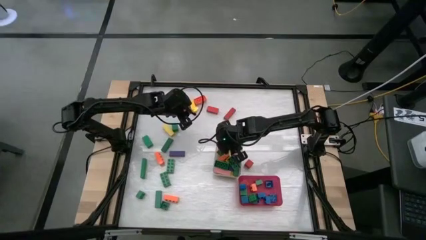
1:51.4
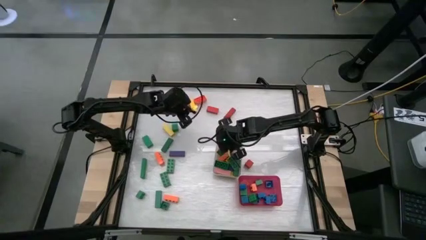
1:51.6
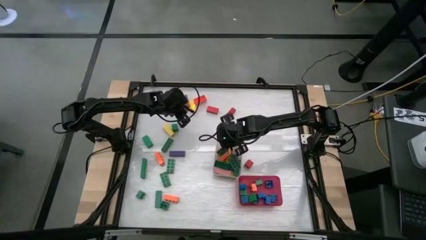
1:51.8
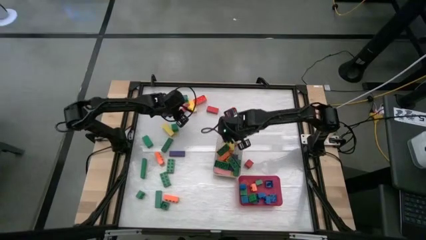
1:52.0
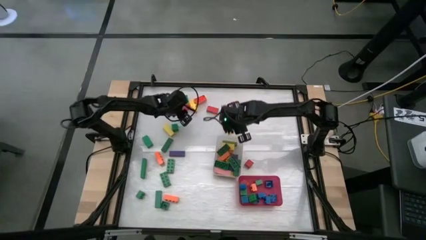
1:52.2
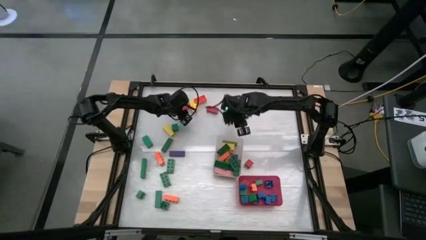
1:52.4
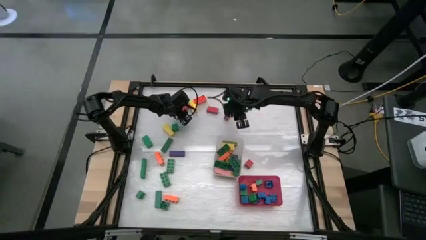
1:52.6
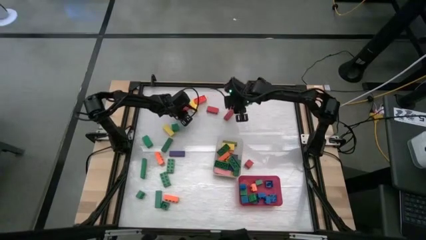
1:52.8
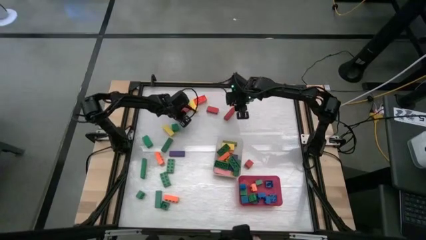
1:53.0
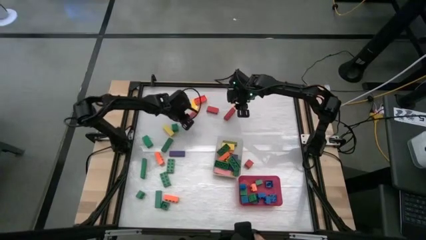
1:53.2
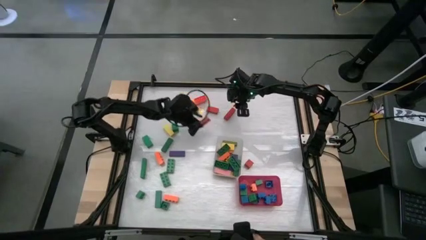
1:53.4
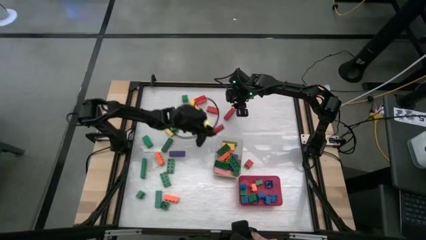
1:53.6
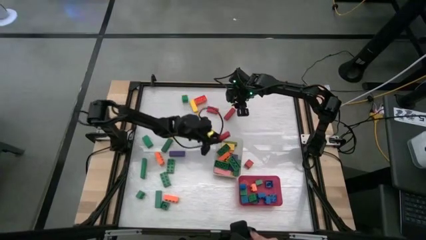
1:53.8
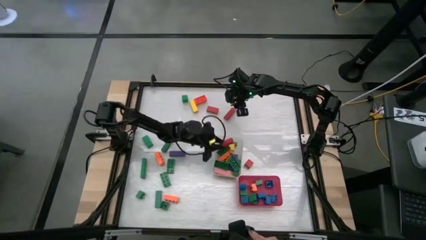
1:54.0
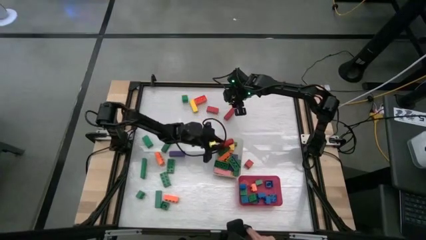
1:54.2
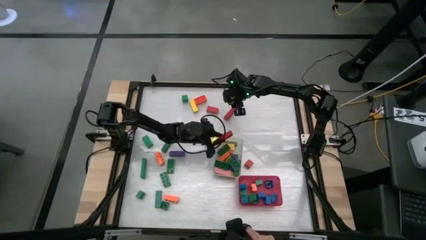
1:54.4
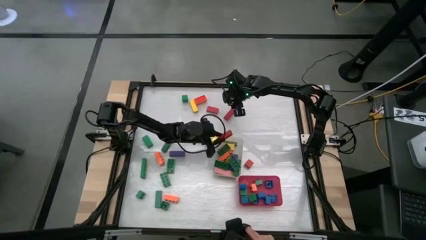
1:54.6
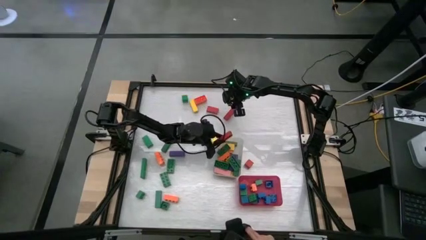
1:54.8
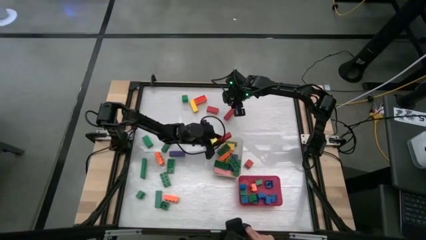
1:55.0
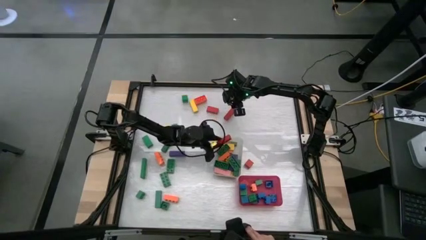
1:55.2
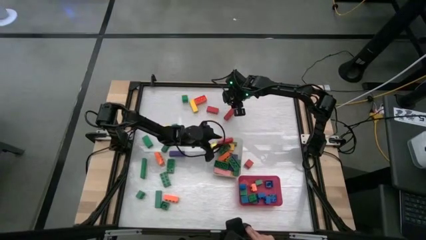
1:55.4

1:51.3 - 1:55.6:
Task: Sort blocks by size
Put the orange rectangular block into the transparent bin

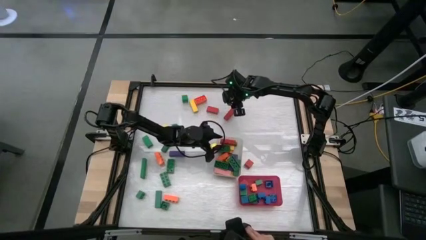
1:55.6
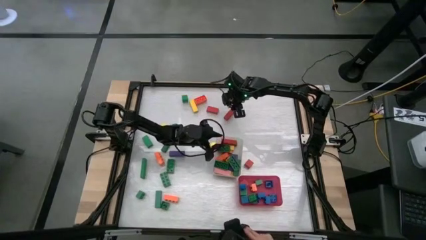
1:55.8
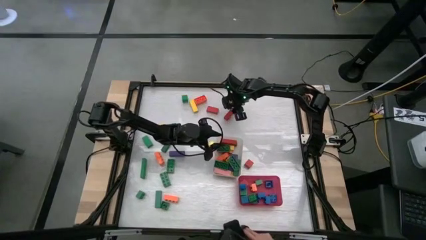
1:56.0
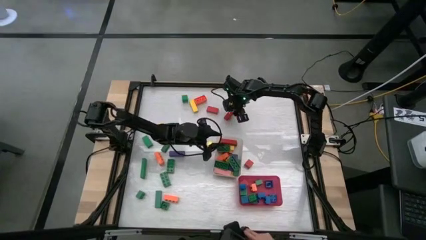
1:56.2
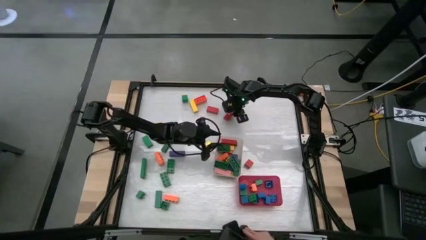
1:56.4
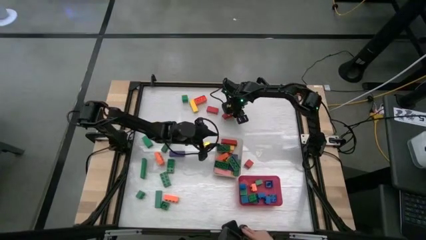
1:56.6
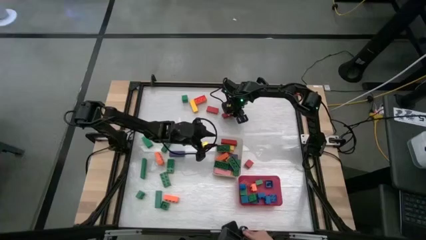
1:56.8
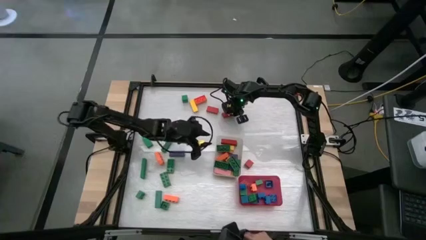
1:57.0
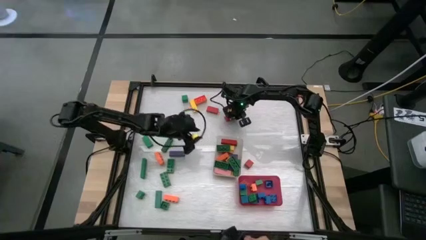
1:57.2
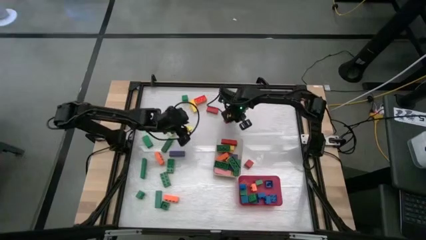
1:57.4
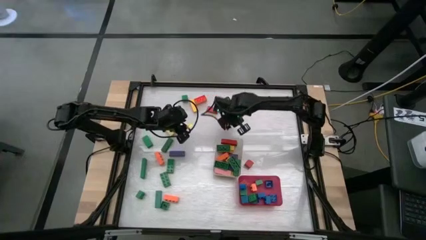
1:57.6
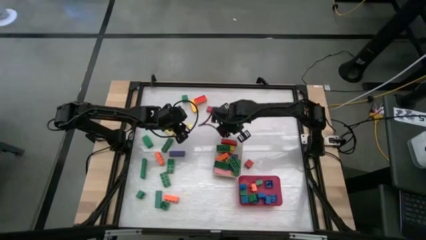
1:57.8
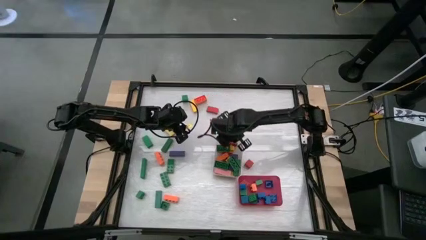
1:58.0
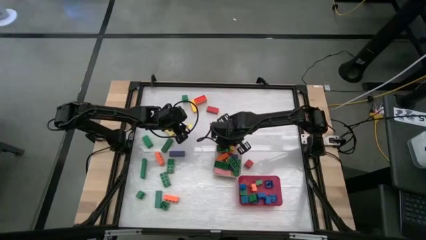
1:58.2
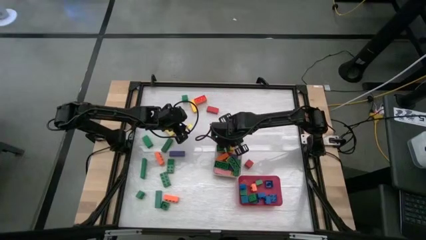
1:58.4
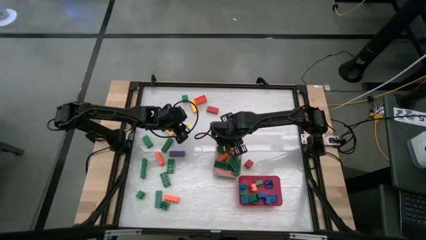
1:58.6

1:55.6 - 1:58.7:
Put the red rectangular block into the transparent bin

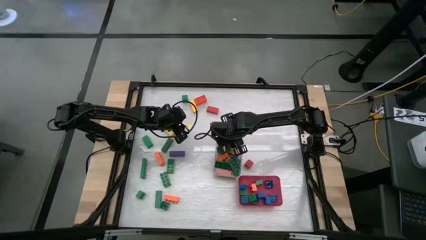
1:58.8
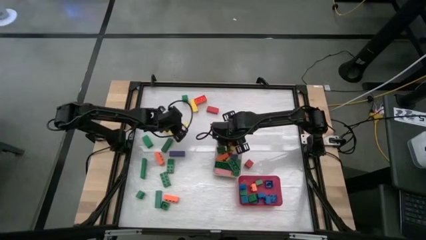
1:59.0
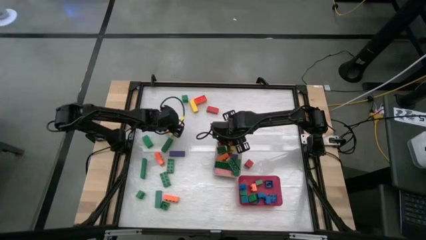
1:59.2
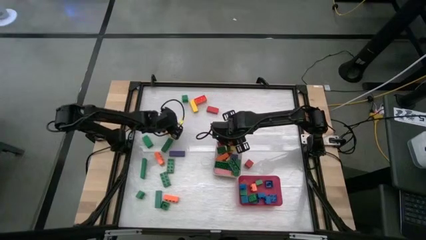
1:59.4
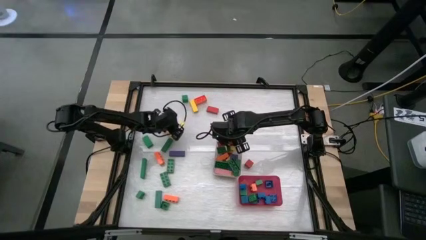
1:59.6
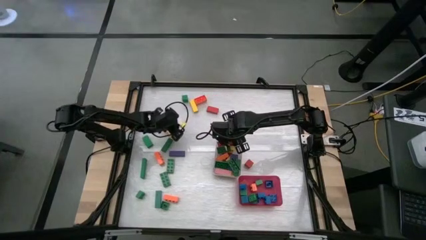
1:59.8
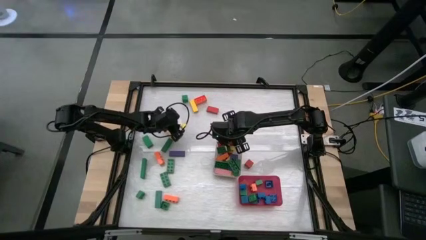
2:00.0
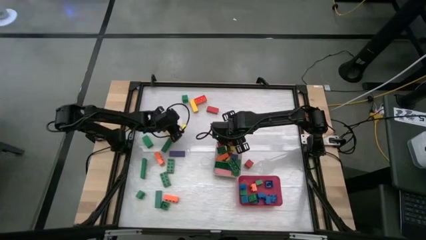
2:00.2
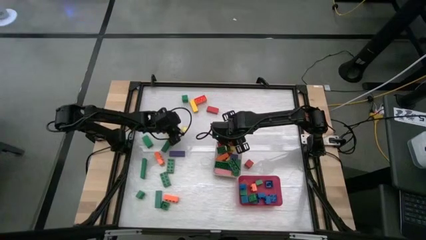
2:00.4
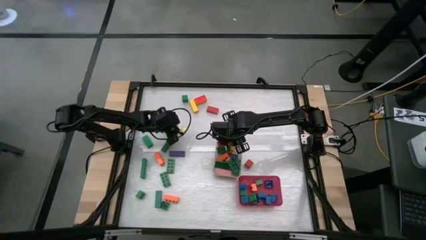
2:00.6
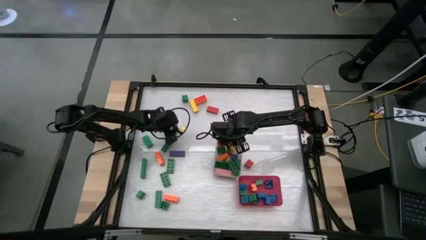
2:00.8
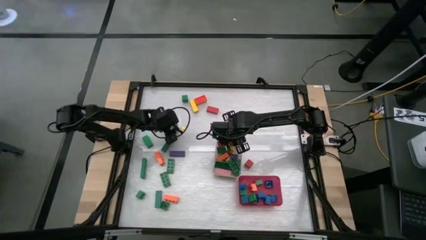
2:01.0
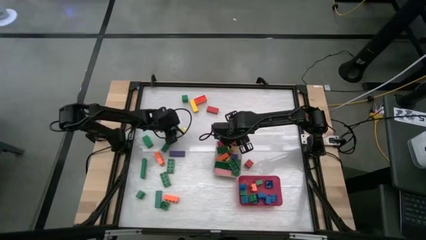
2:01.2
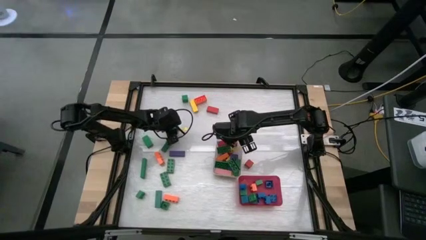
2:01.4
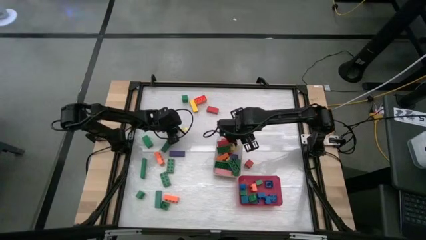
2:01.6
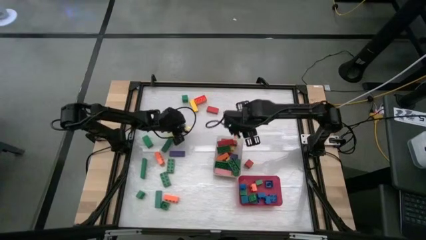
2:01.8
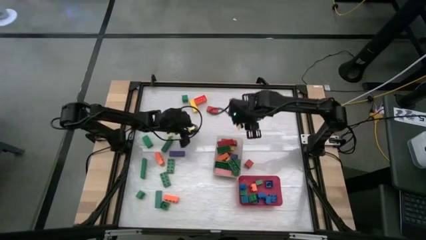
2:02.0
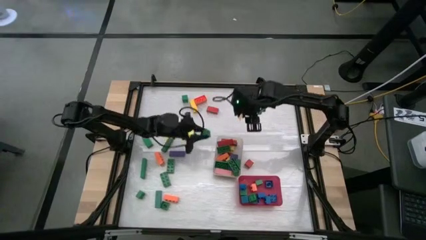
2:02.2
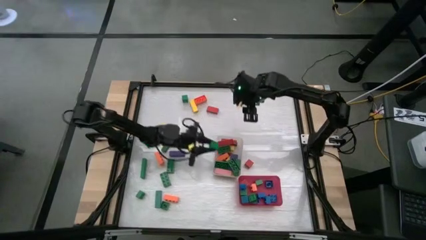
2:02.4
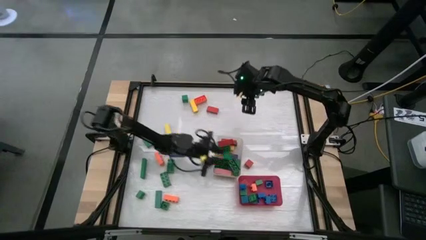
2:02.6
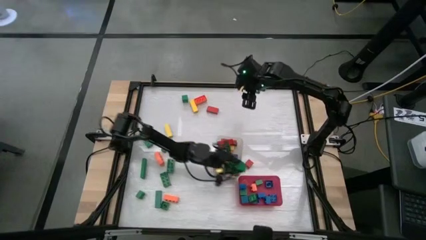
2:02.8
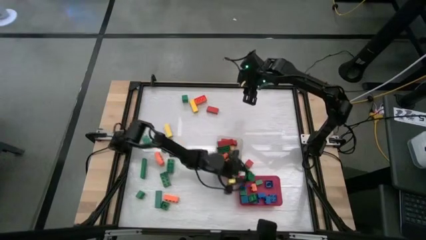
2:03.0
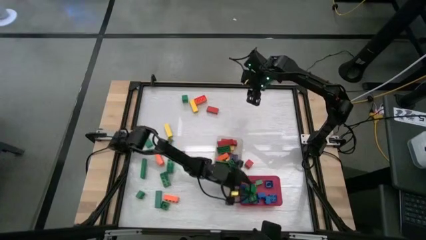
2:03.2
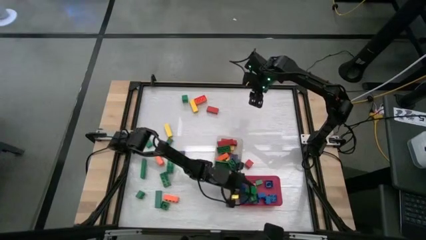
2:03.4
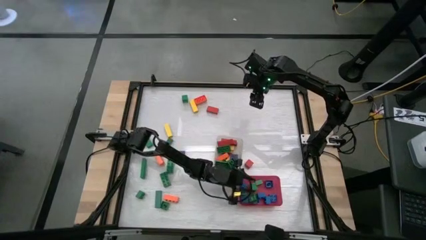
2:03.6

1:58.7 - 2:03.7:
Put the green square block into the red bin

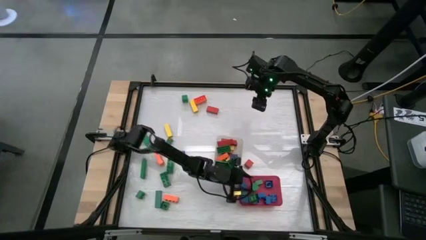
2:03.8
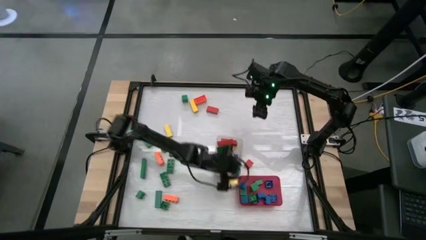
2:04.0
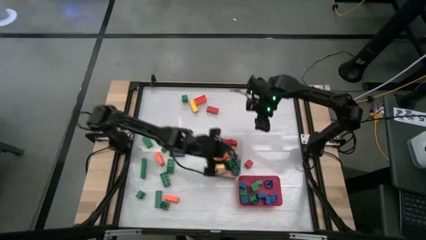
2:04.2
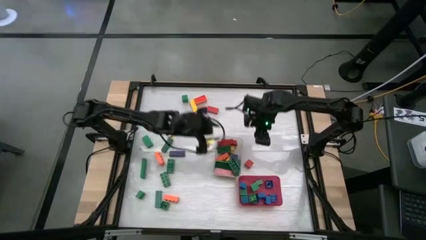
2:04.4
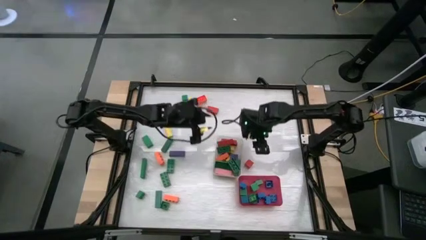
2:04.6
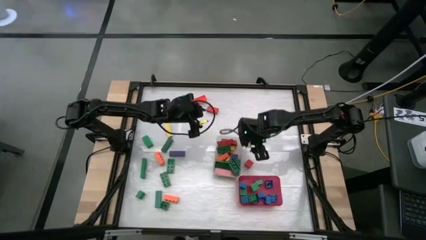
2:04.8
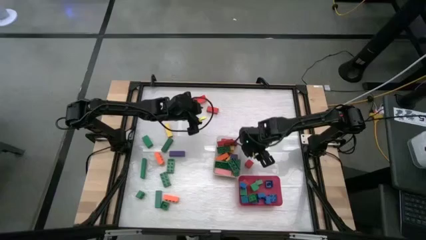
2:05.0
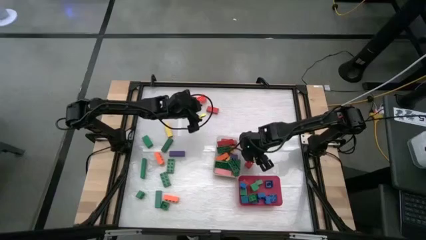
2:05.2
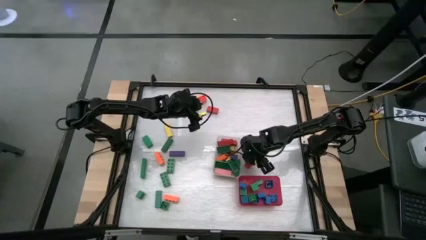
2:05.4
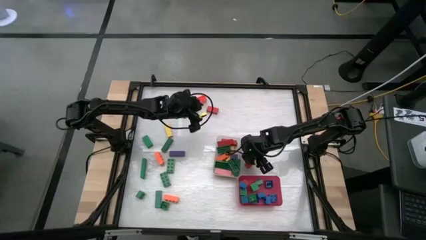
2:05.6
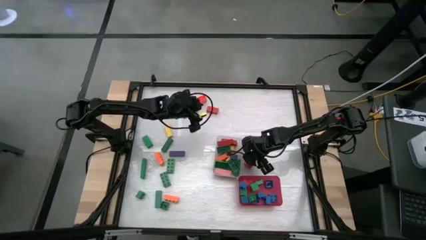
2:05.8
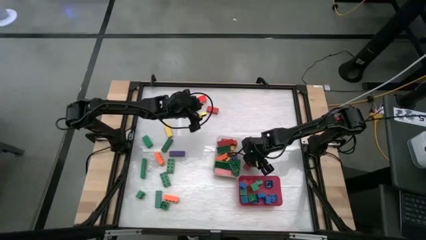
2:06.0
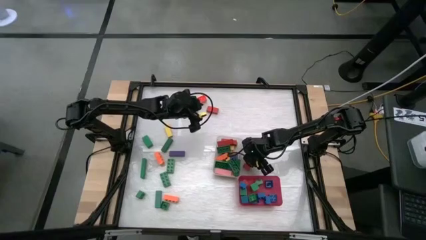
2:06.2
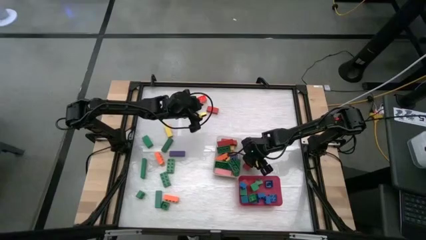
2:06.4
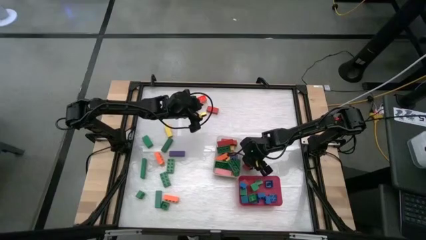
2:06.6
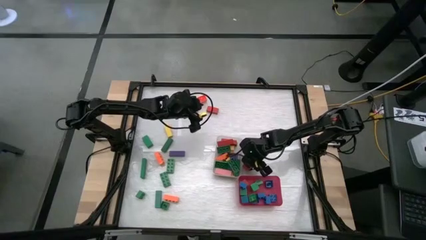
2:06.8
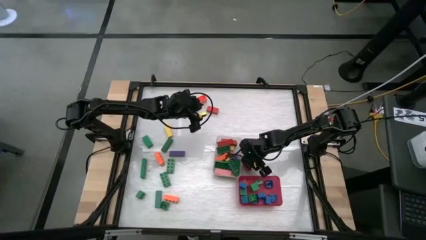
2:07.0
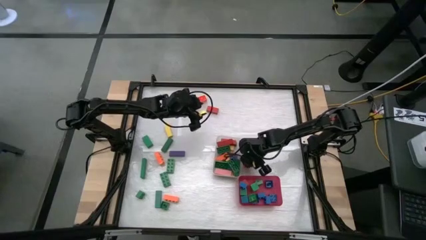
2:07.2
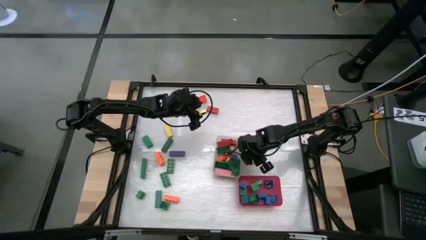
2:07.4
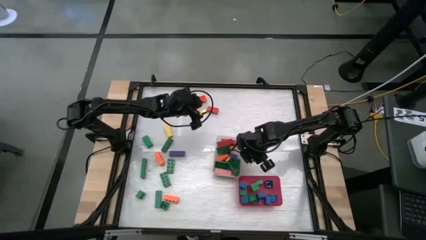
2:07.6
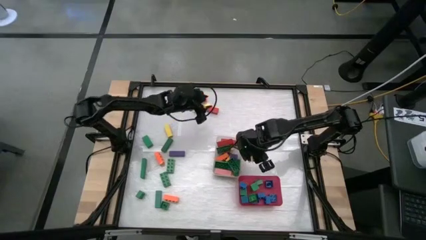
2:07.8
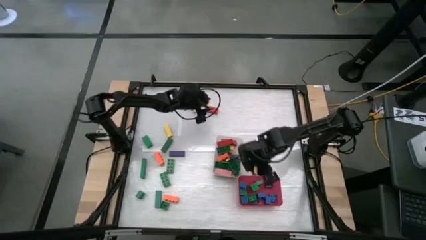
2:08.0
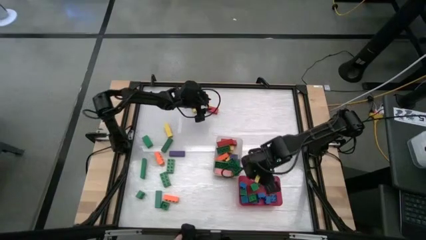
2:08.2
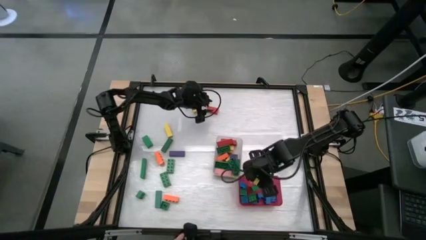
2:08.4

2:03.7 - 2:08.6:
Put the red square block into the red bin
